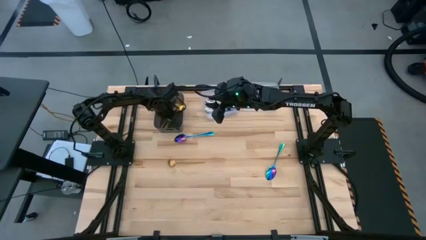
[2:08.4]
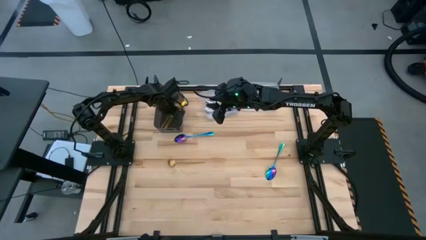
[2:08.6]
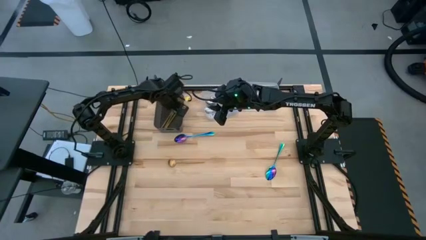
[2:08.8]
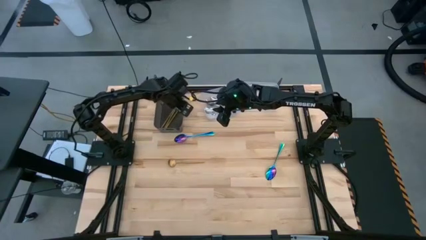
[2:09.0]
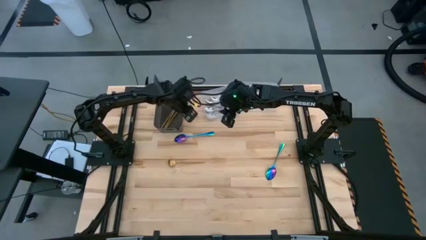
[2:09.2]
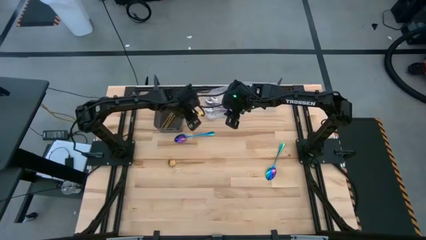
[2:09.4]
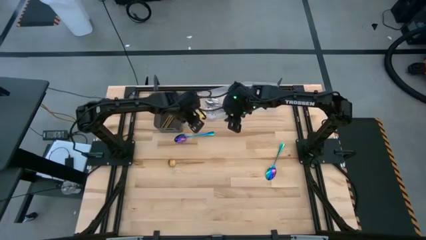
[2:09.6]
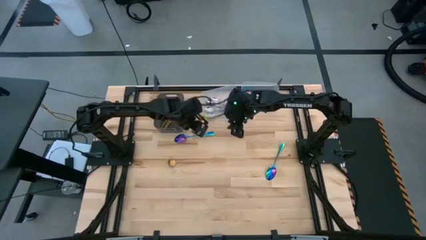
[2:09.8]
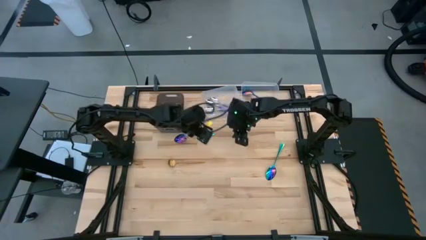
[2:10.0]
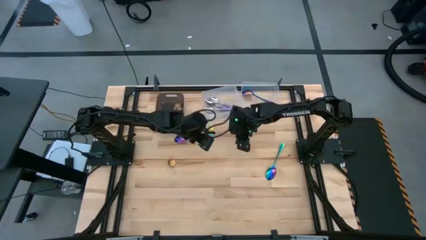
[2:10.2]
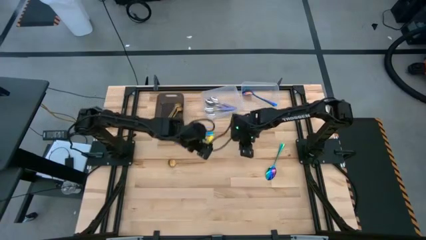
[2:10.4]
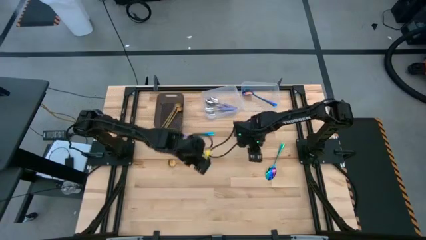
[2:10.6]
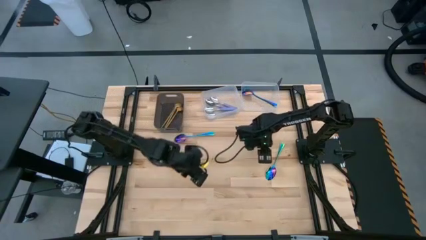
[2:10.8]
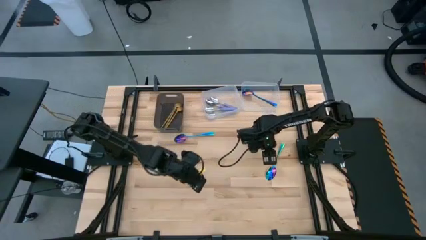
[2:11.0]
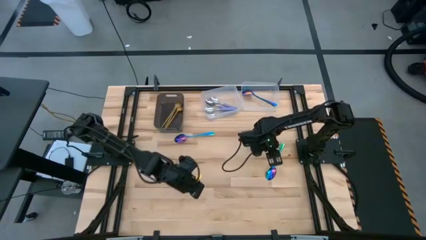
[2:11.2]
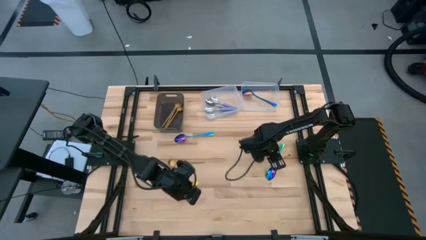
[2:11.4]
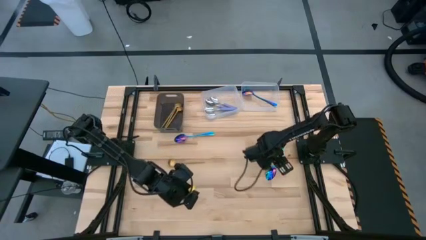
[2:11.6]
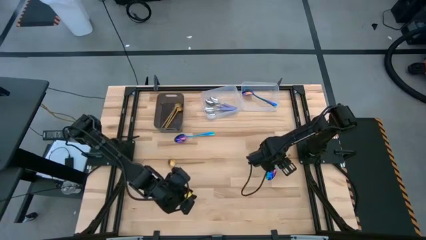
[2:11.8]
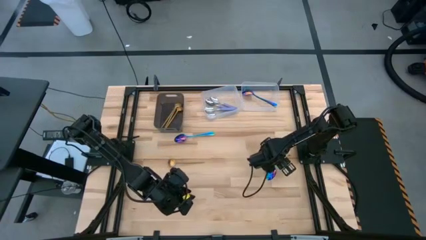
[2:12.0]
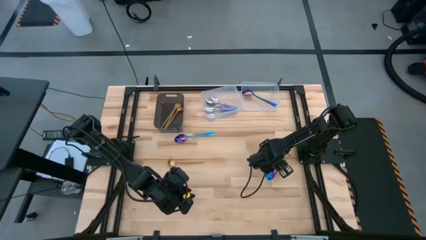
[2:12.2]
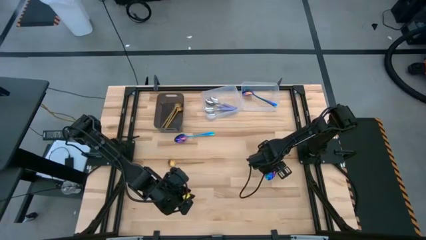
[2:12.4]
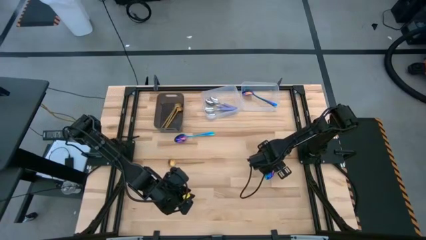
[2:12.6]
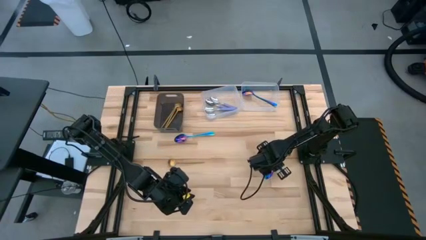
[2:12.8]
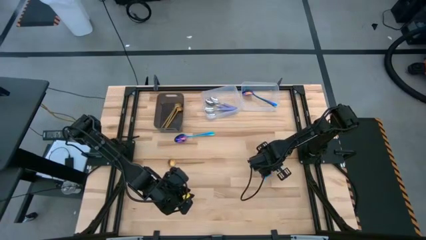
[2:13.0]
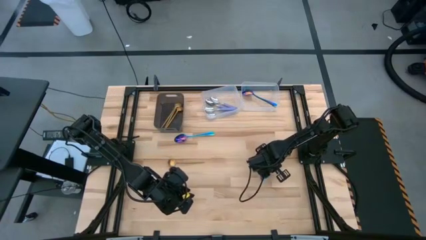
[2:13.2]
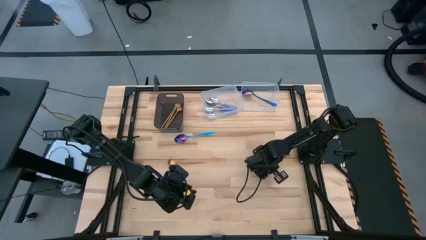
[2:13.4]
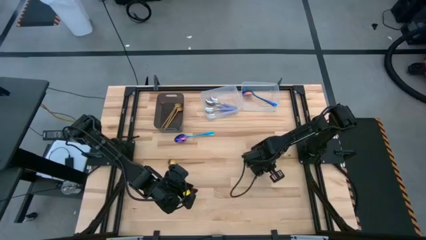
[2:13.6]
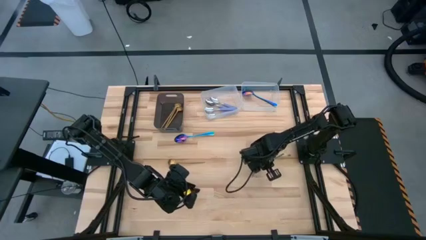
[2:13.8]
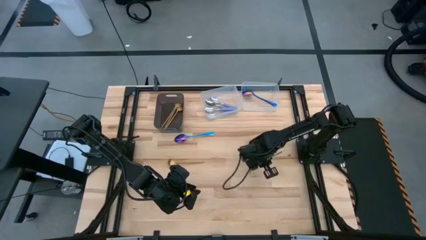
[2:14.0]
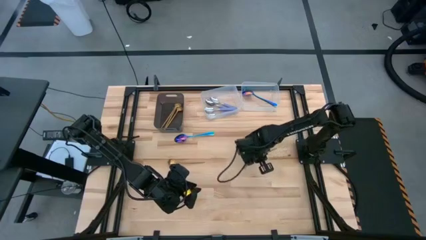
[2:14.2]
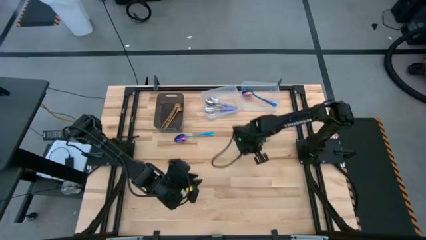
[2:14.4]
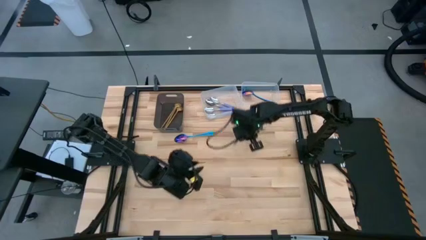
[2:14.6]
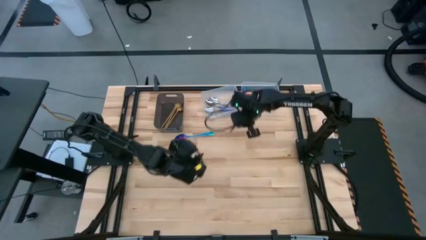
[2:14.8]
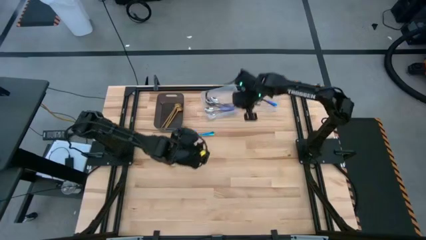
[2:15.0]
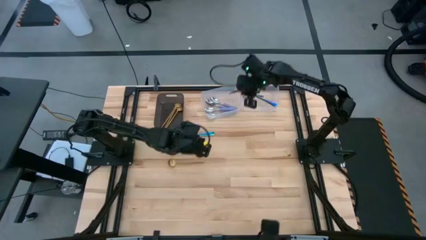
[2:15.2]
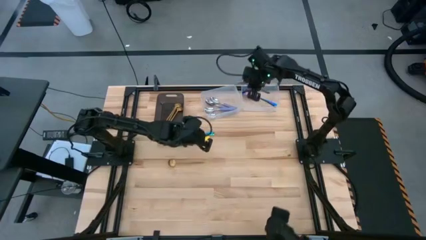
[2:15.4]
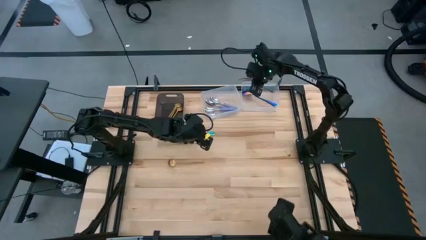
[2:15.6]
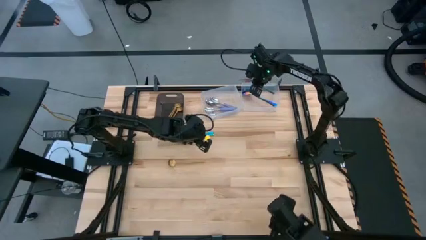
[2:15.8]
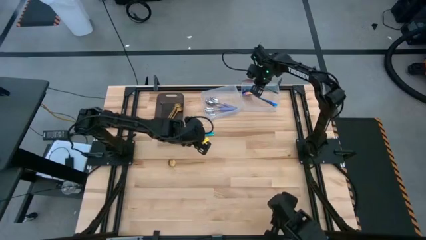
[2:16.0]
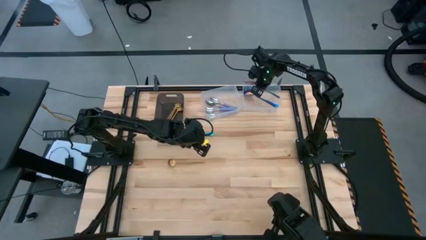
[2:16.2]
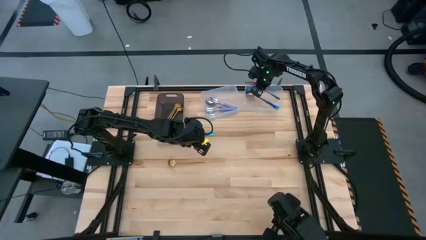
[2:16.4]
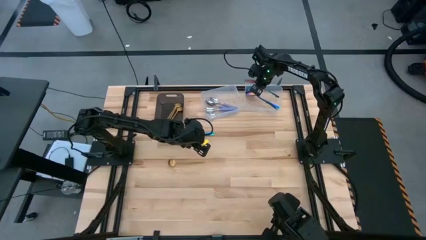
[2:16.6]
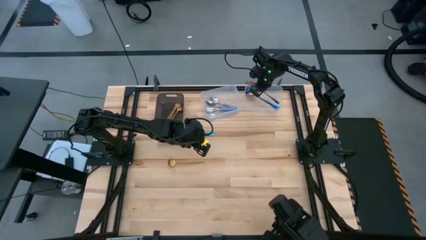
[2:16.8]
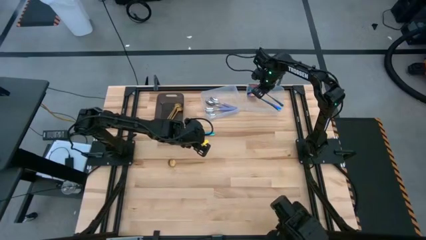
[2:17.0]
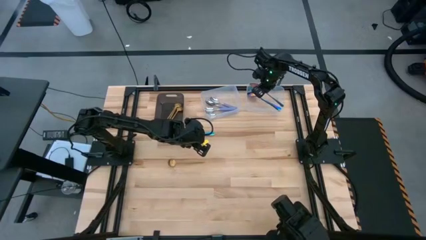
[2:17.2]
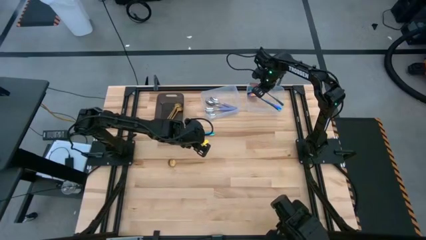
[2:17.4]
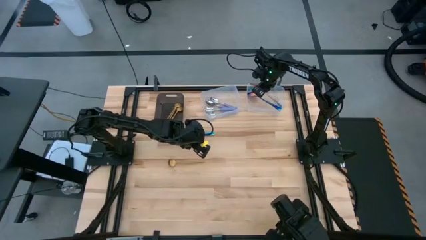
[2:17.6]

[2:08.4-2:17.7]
Task: Sort silverware by color (type)
Put the blue spoon into the right transparent bin
